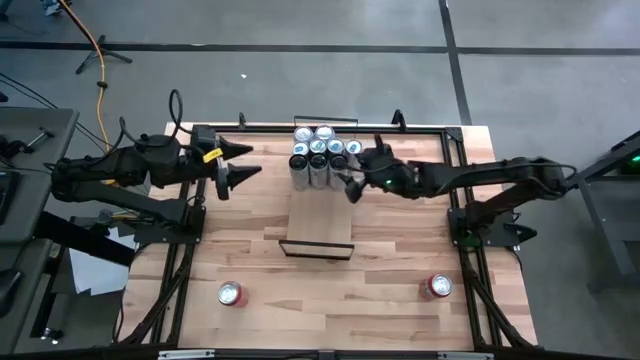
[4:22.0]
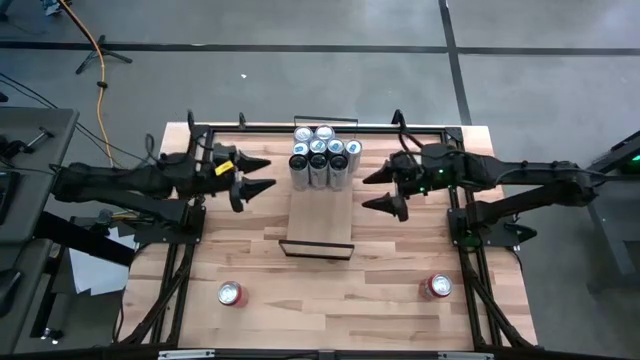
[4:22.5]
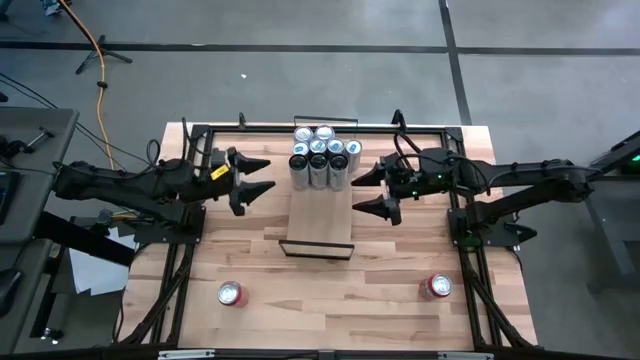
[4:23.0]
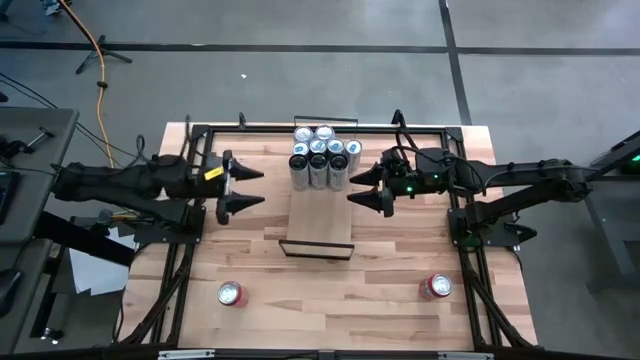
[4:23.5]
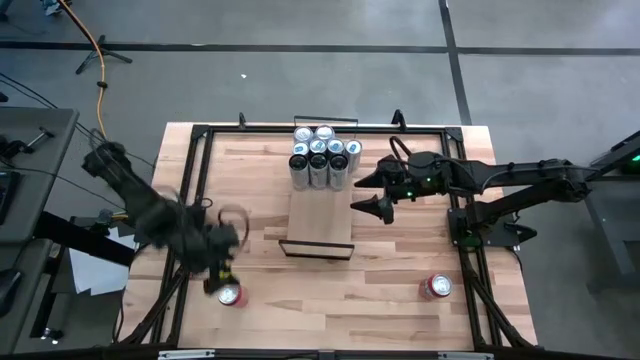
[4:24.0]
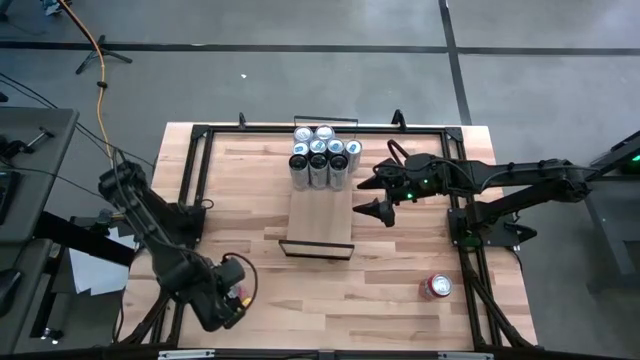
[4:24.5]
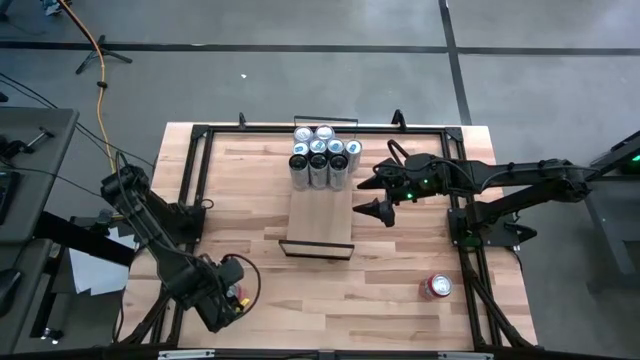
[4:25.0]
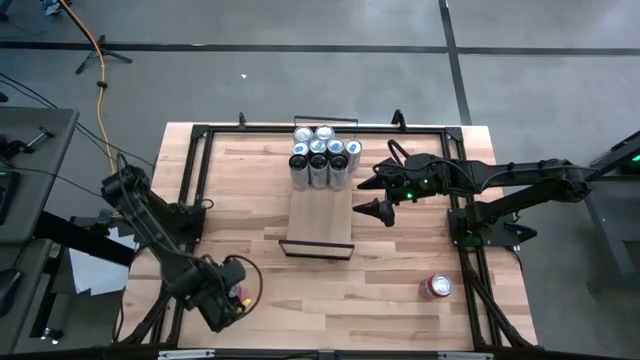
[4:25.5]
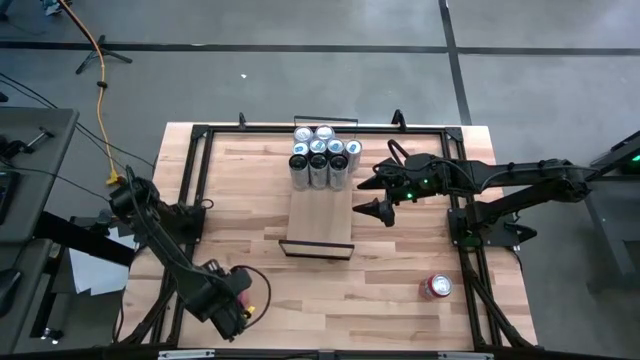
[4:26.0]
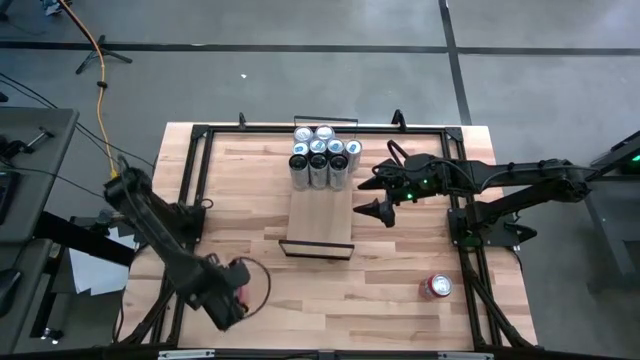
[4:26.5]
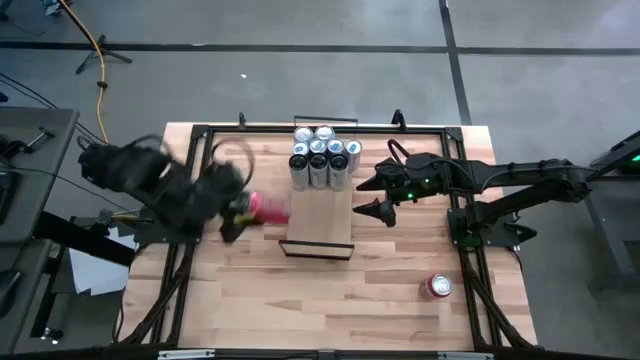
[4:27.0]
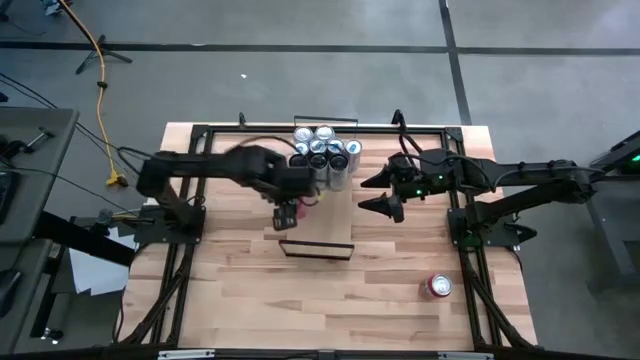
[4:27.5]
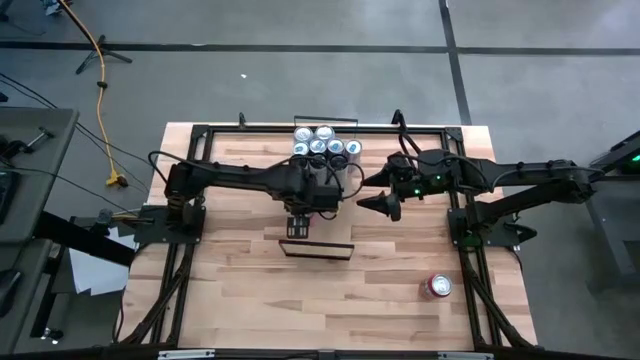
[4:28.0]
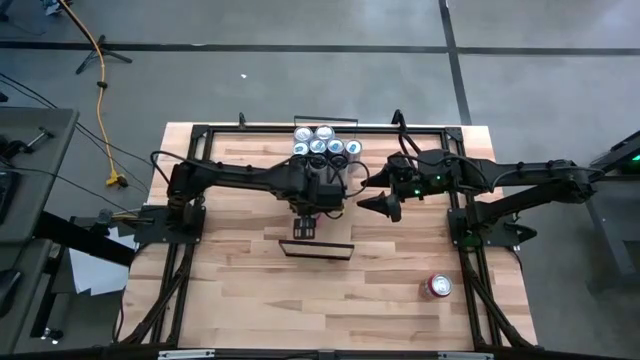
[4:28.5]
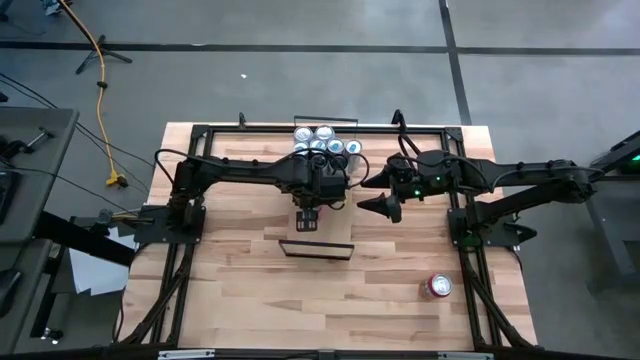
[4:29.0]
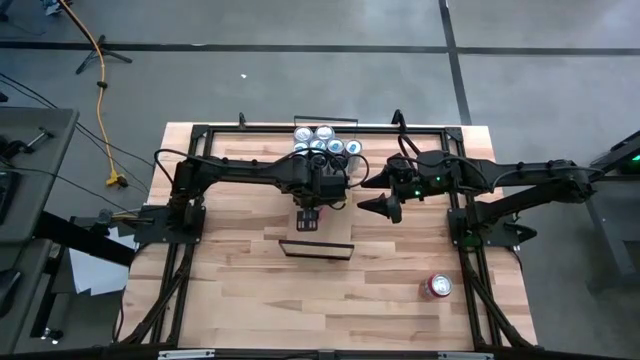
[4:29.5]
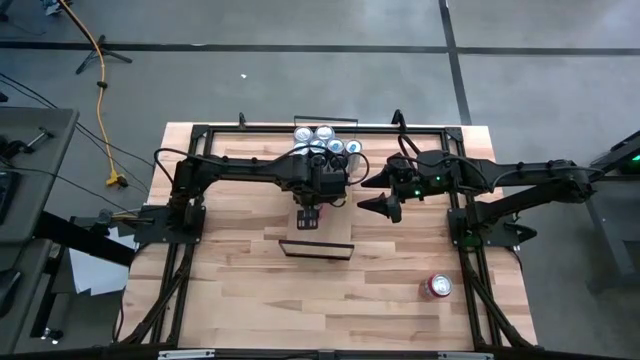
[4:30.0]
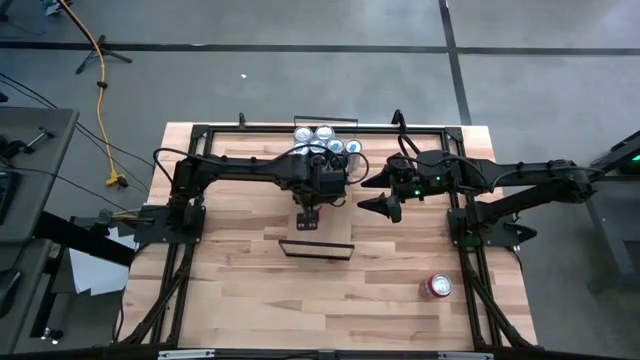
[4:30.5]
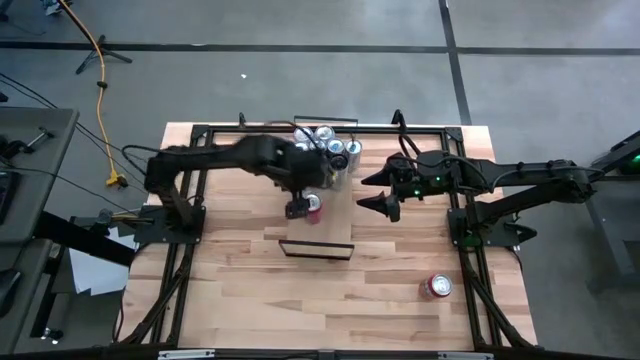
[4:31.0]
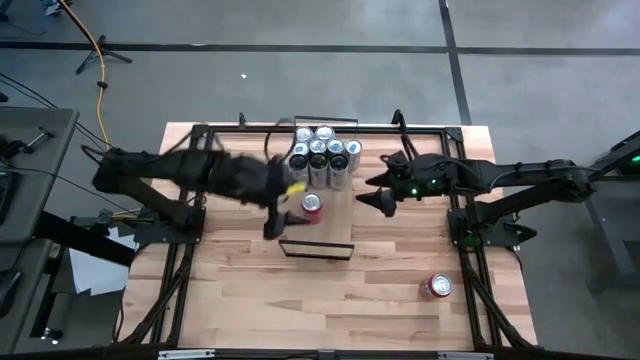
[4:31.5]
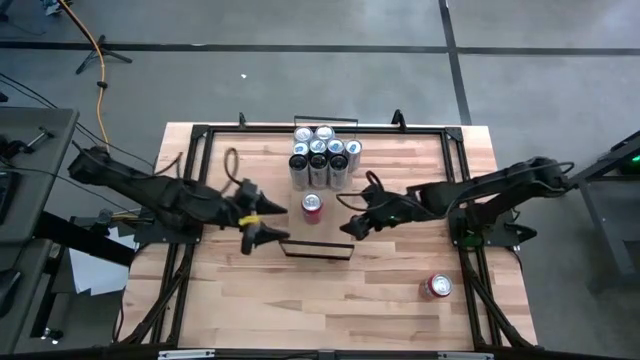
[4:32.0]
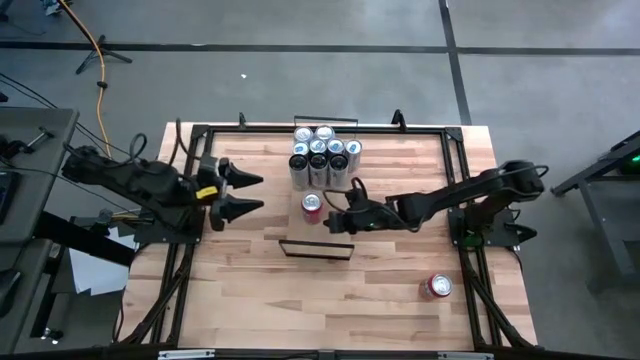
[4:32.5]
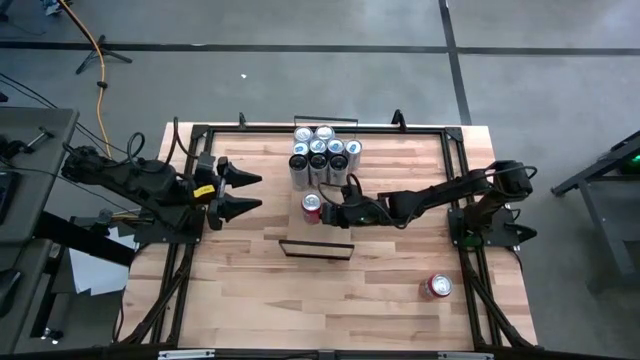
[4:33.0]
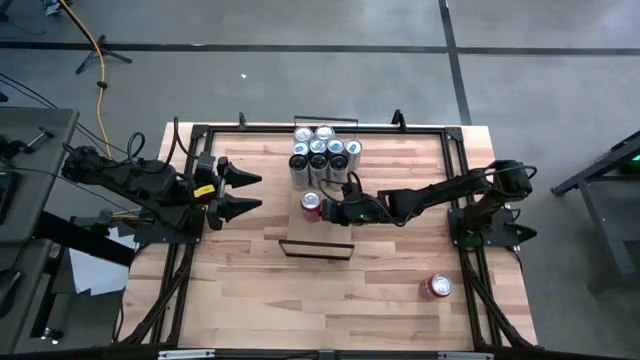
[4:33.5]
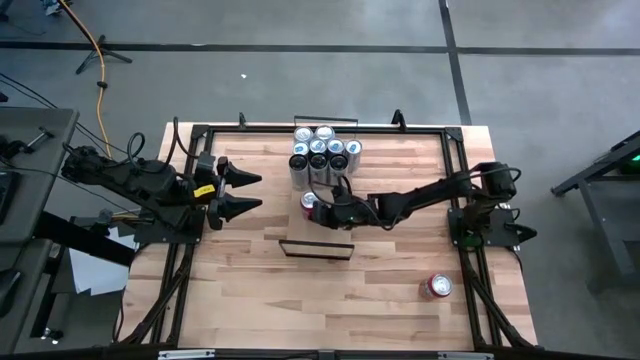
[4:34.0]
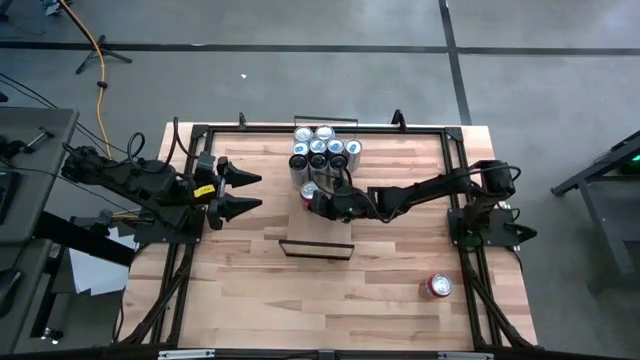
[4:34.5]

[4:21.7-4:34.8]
Task: Place canned beverage on shelf
Put the orange soda can on the shelf

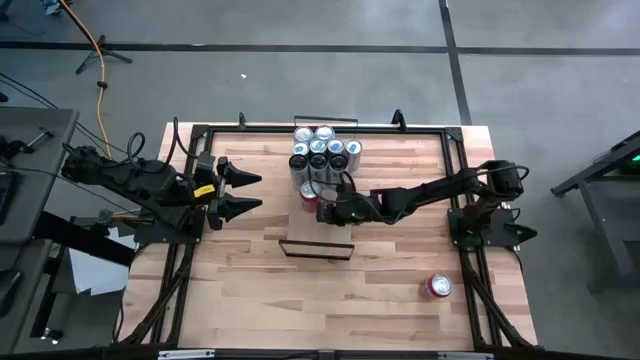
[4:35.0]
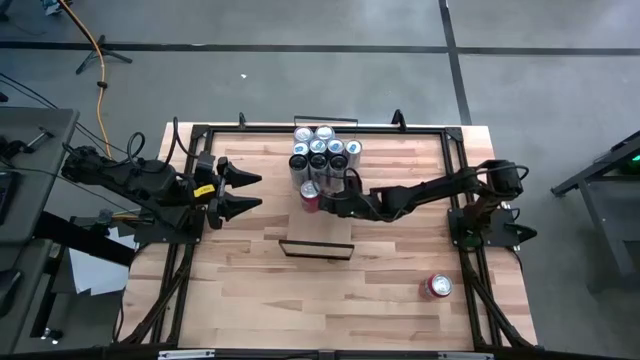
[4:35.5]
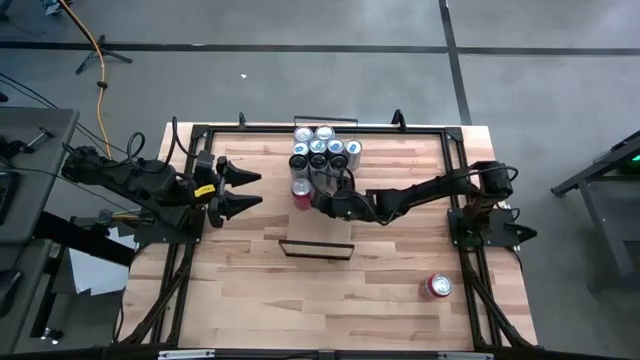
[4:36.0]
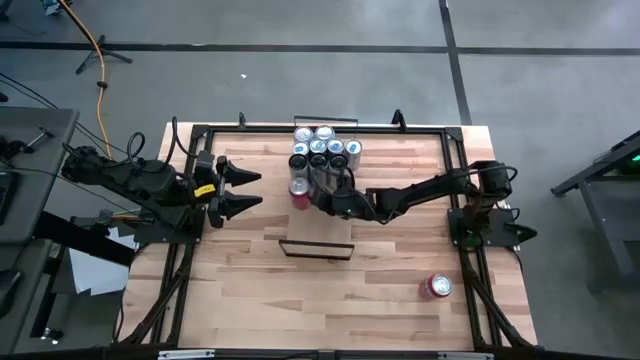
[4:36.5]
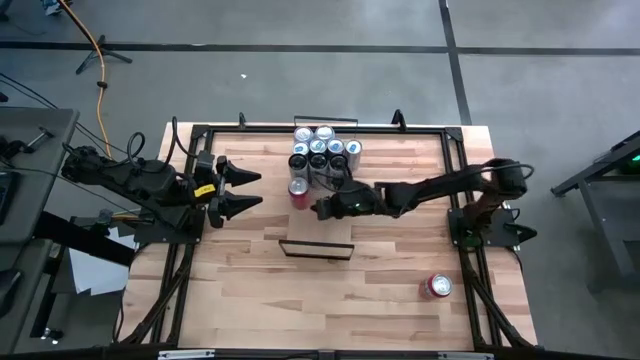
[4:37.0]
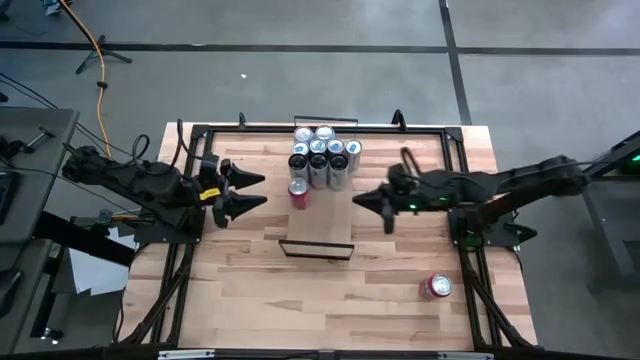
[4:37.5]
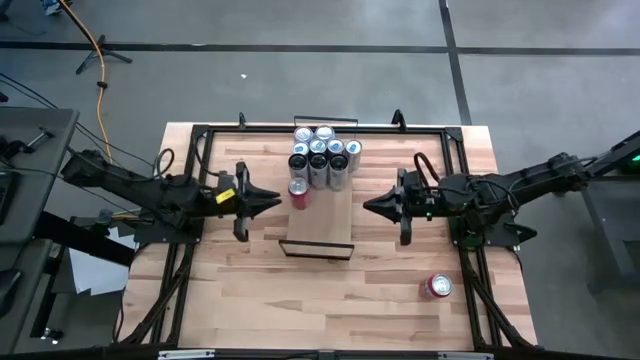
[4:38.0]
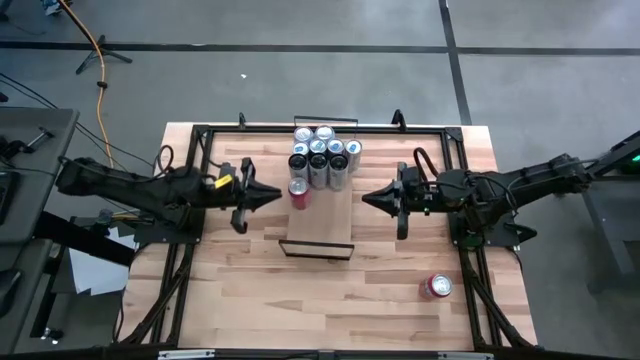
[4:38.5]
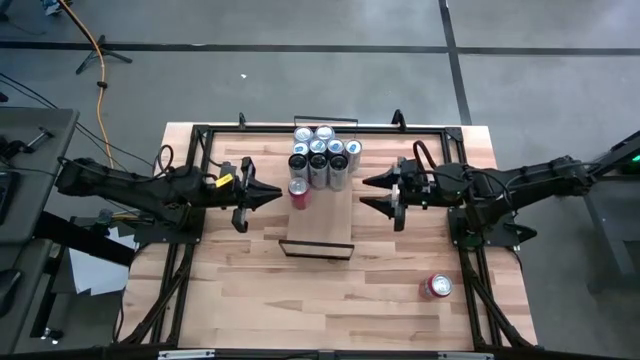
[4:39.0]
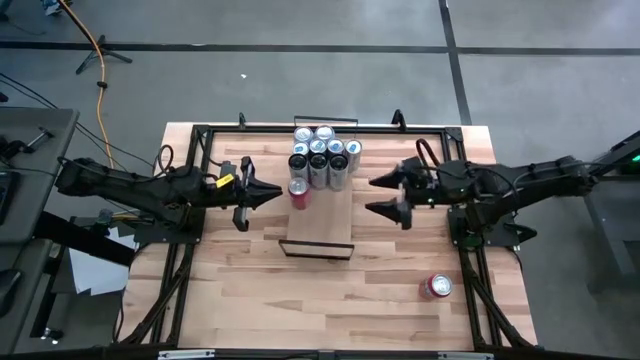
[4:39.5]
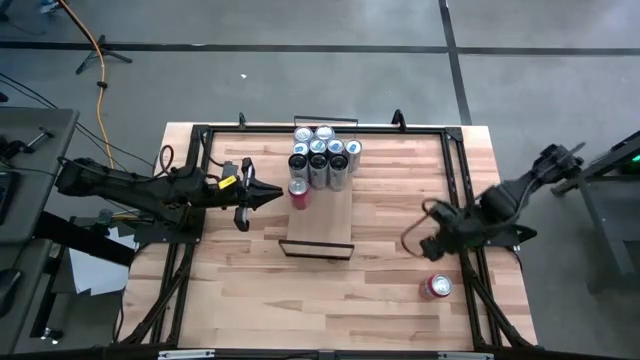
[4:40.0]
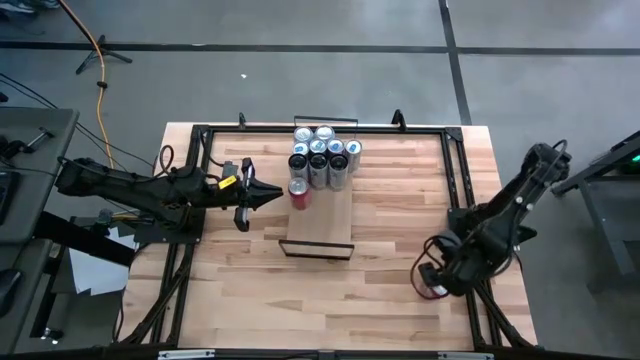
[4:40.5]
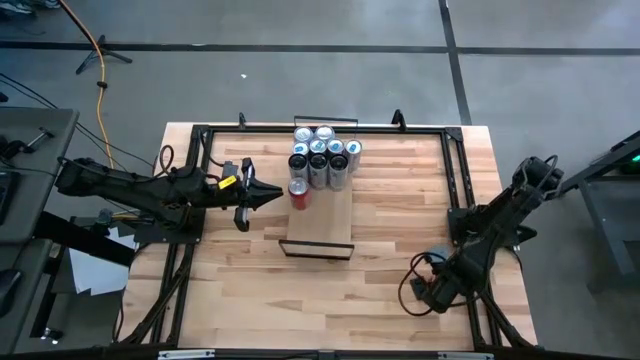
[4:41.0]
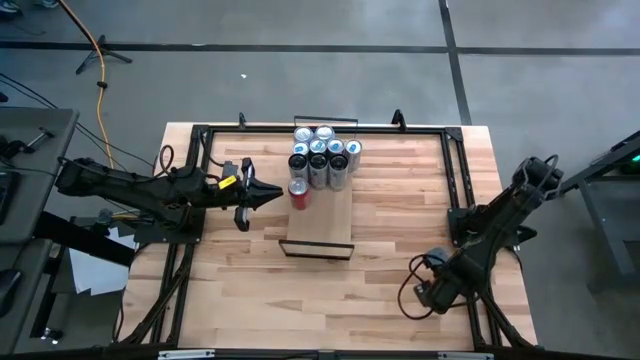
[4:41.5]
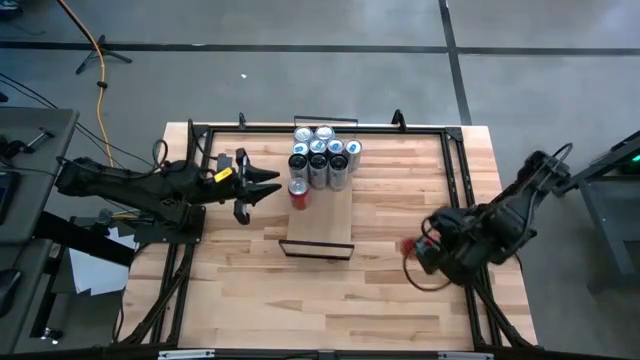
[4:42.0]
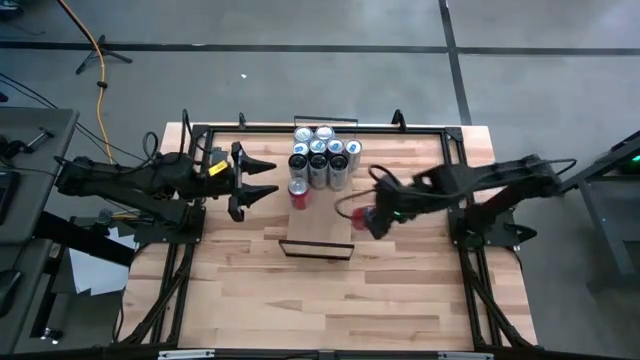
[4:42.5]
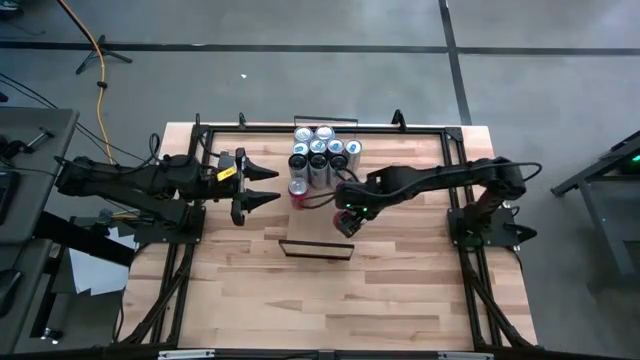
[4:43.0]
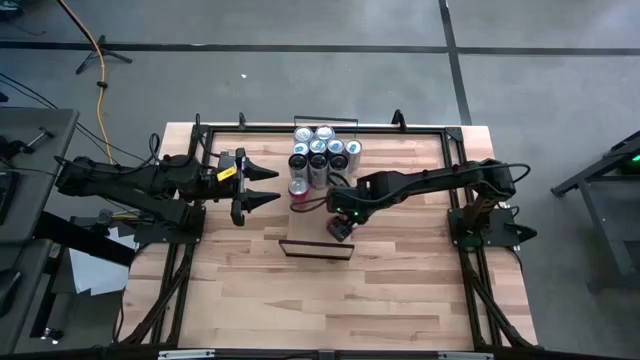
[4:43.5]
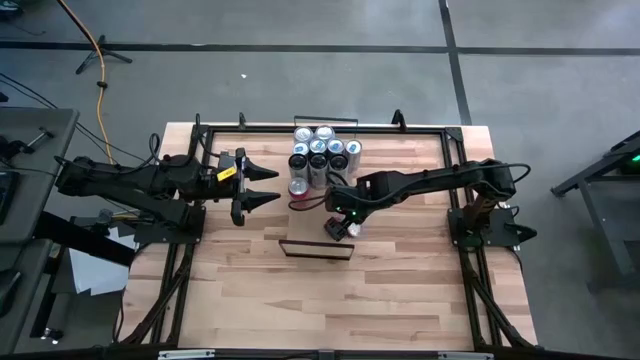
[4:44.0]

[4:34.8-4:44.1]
Put the red soda can on the shelf aligned with the other red soda can
